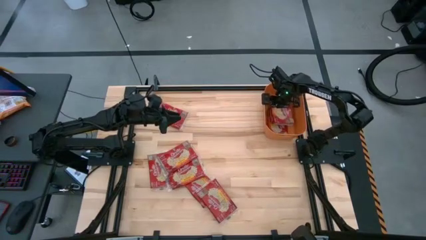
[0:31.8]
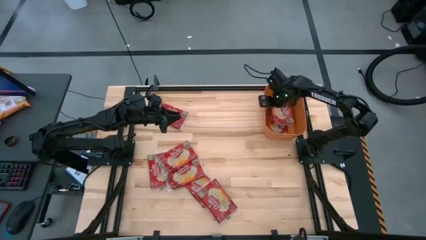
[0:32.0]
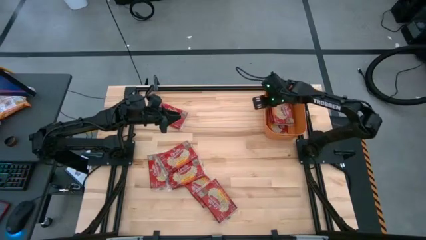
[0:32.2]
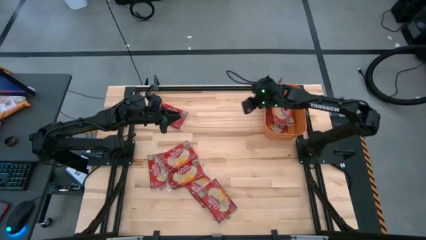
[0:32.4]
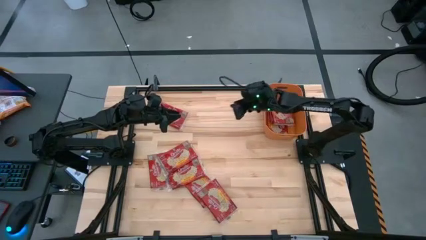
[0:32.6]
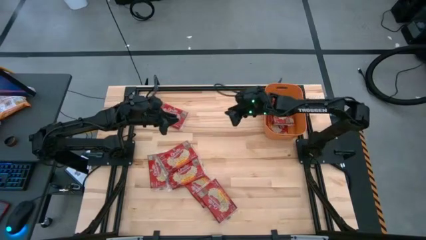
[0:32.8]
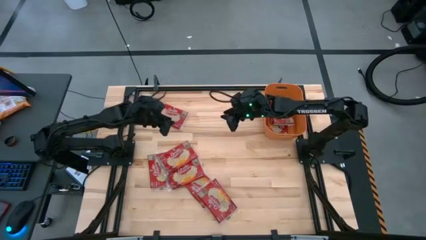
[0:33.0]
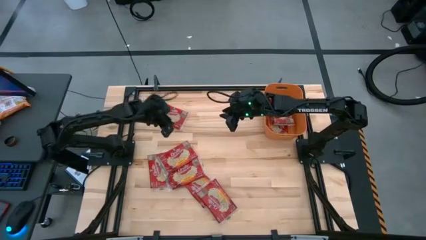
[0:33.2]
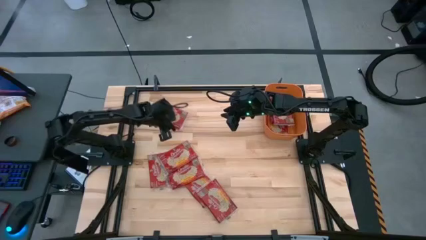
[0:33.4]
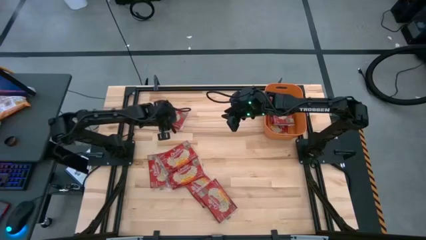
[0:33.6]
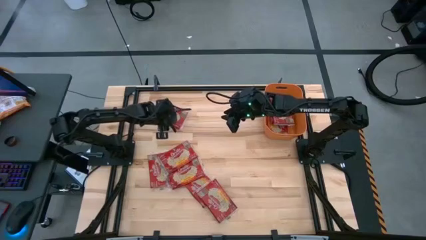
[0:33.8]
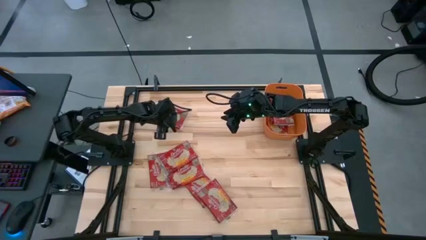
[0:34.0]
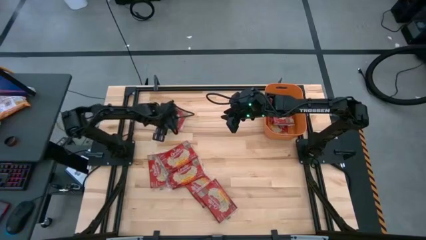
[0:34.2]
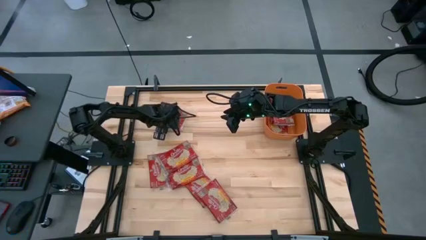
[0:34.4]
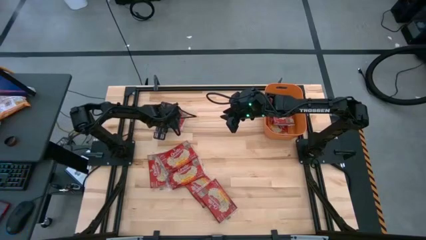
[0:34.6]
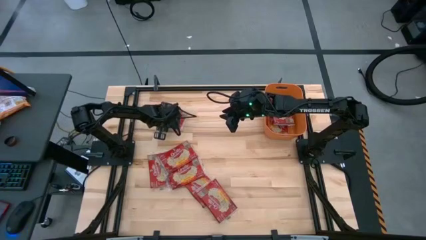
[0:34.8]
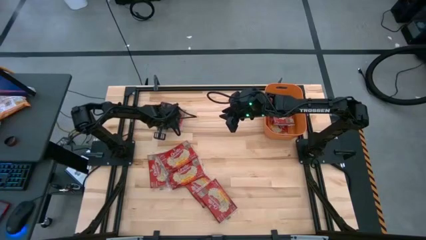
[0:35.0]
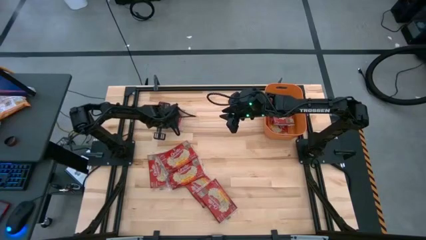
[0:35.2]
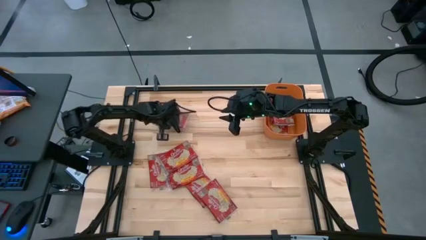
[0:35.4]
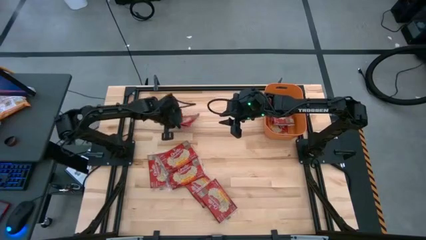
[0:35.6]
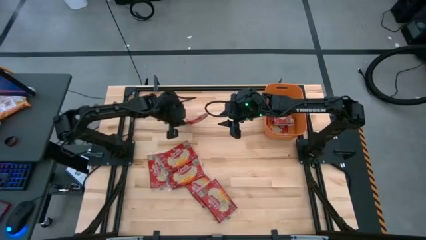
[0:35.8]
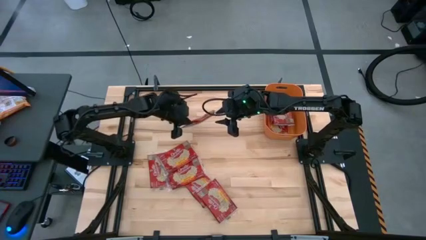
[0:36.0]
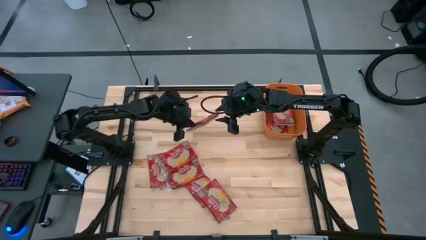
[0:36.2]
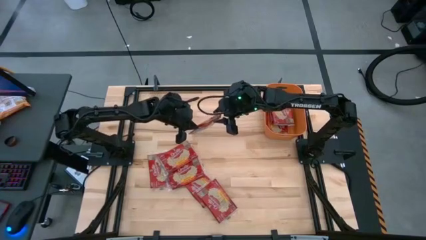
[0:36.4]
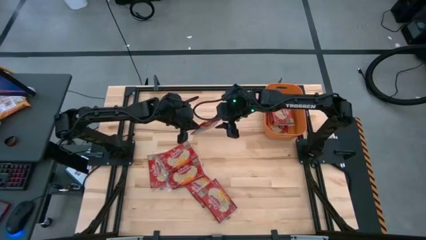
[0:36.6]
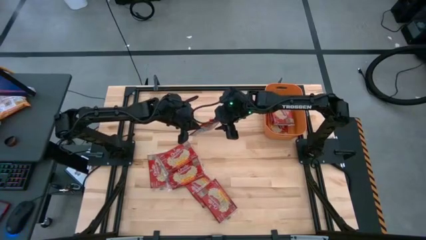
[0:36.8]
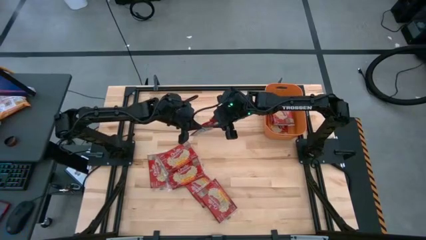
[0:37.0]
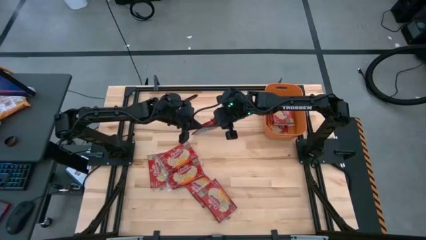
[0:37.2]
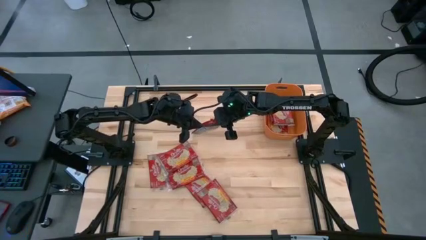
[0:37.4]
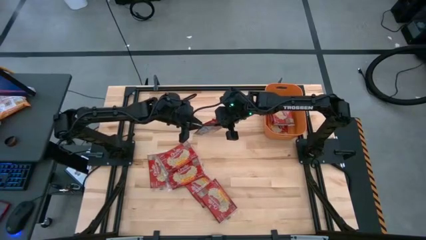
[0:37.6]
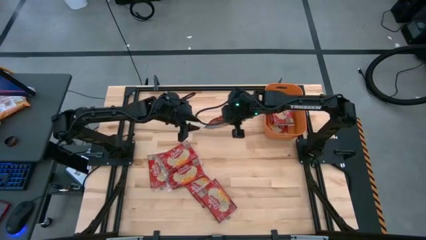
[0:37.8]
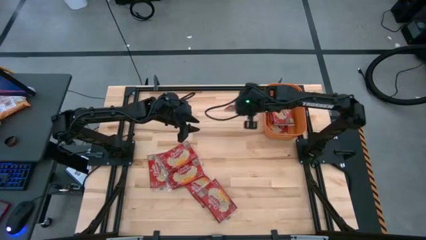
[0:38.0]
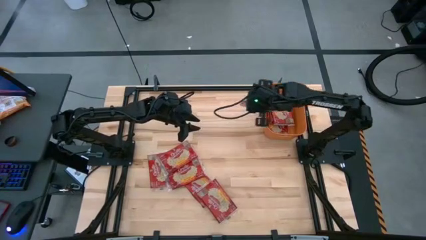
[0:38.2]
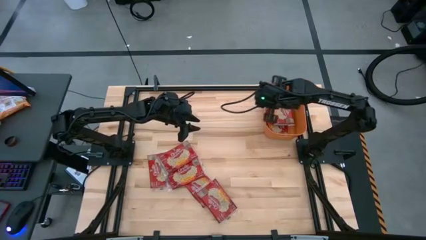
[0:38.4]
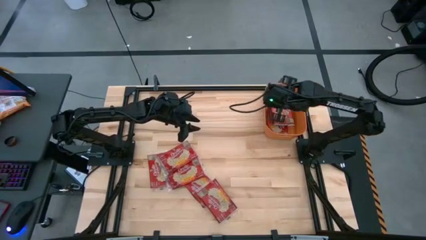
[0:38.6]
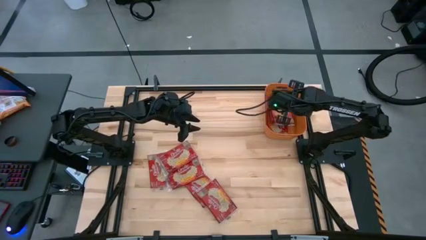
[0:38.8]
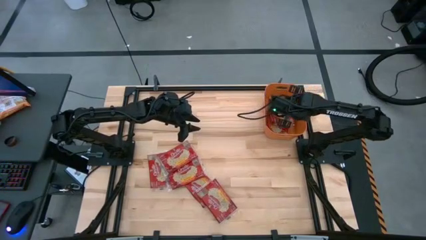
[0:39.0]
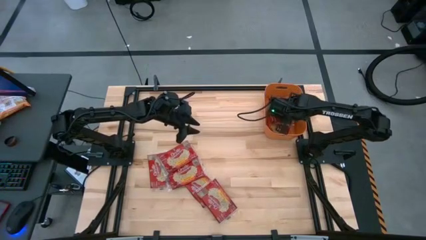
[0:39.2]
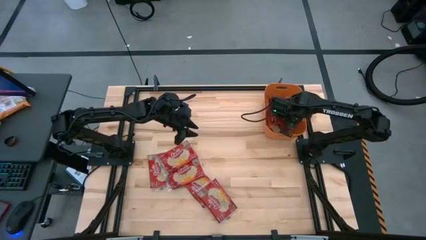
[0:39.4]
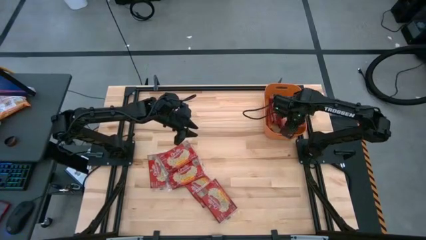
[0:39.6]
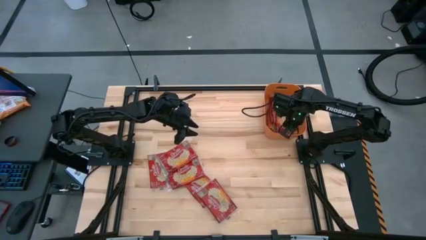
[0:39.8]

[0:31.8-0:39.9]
Task: Sort popcorn bags into baskets
Stack the red popcorn on the orange bin

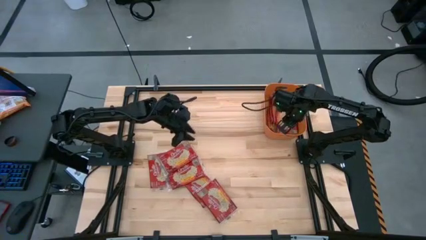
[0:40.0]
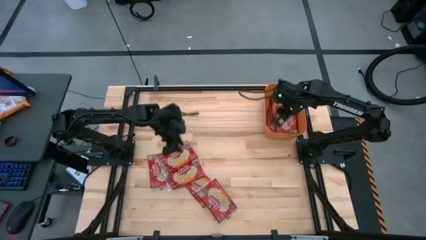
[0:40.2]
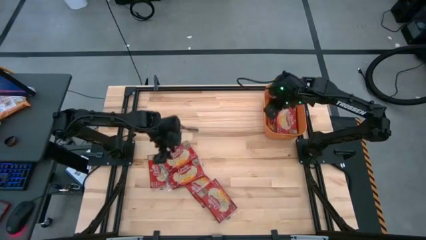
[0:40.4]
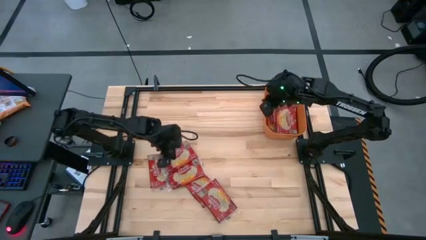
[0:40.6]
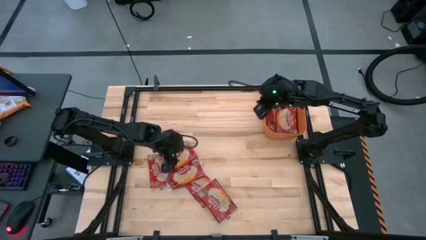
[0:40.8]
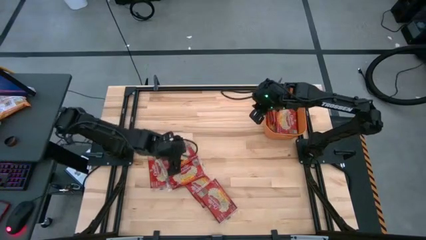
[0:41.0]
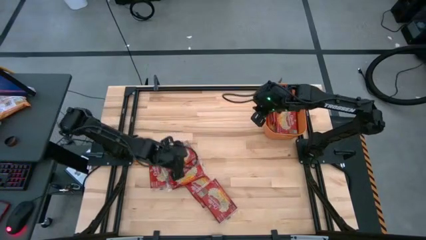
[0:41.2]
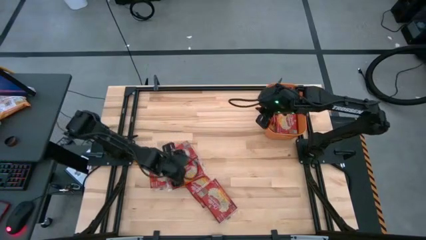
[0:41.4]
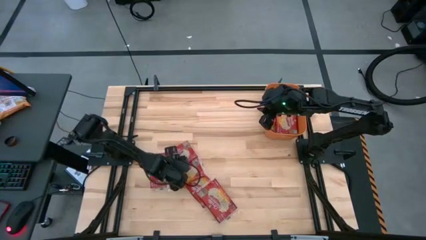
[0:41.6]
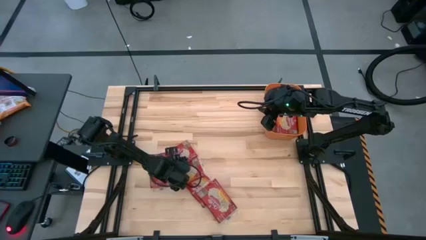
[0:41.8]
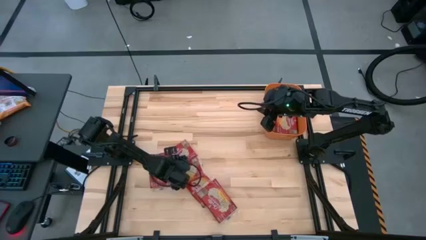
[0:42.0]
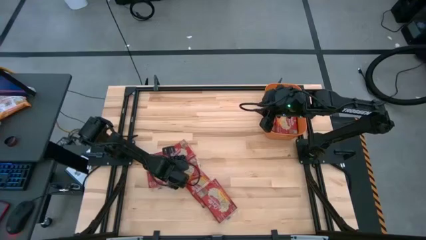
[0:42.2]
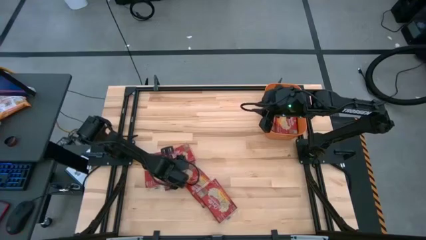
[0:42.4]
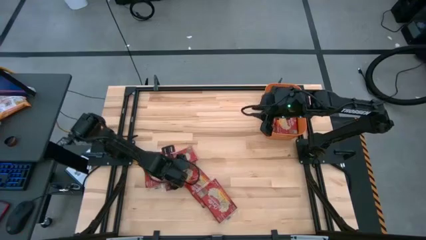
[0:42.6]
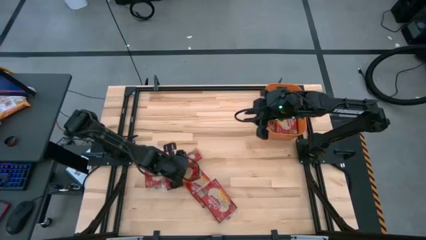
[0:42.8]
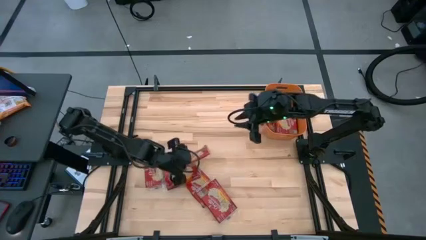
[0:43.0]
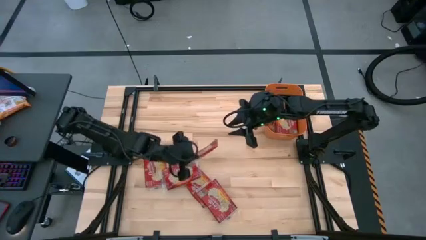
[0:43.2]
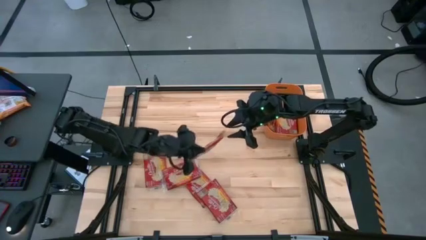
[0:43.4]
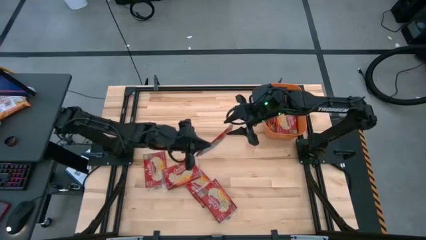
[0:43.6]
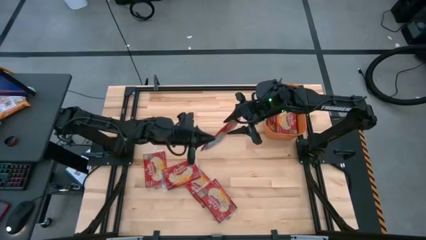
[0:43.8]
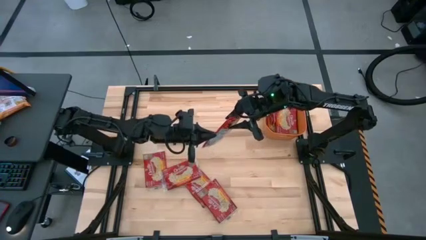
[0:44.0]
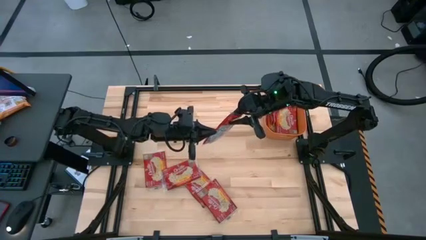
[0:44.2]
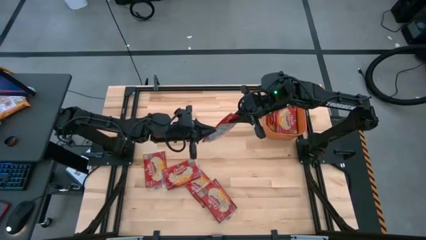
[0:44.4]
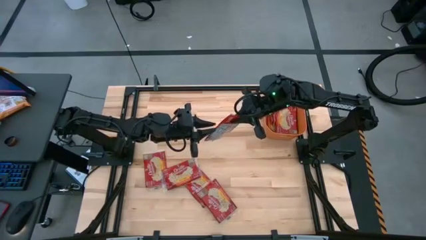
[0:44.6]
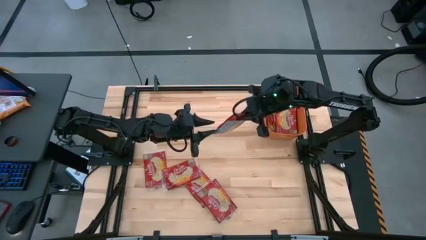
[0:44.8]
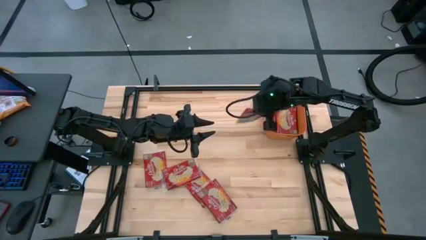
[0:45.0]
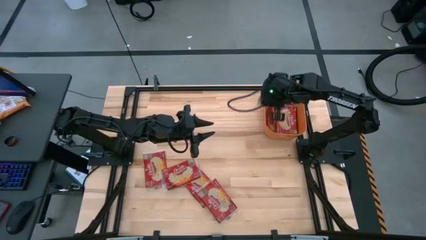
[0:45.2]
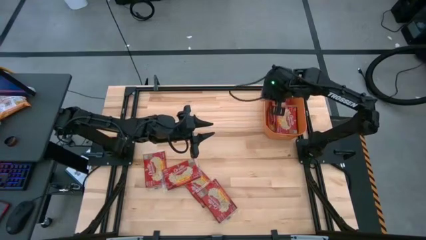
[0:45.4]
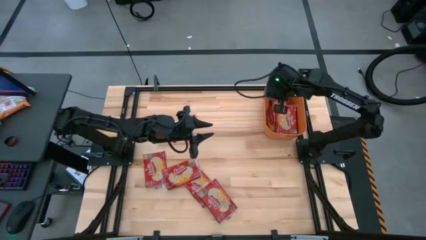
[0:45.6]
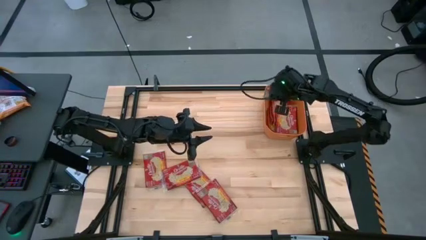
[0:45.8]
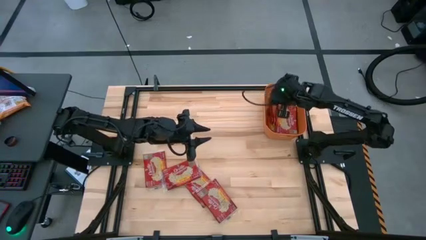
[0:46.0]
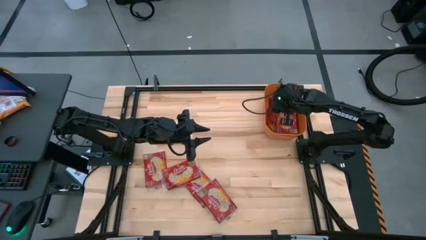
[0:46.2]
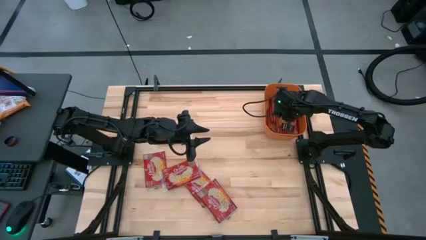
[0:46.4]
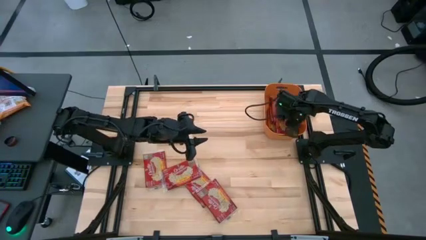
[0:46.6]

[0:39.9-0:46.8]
Stack the red popcorn on the orange bin

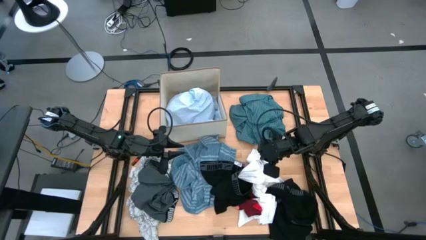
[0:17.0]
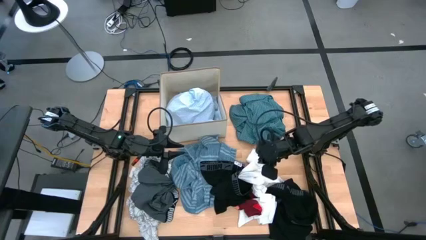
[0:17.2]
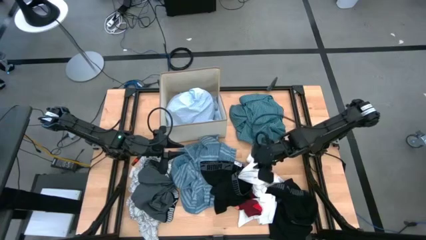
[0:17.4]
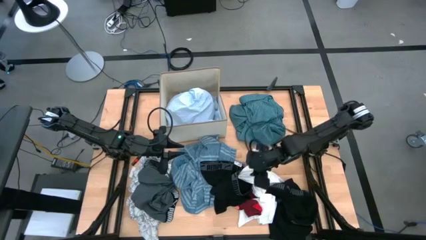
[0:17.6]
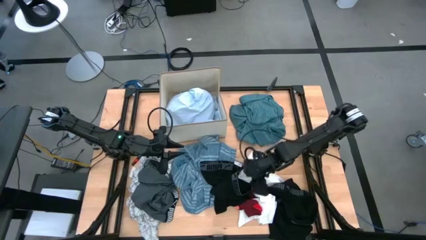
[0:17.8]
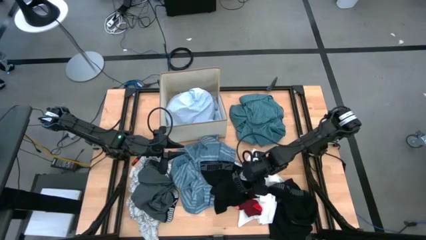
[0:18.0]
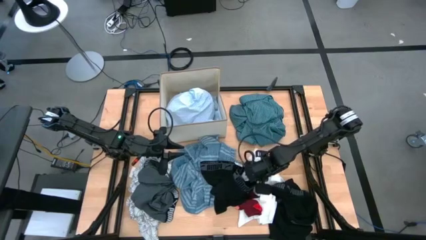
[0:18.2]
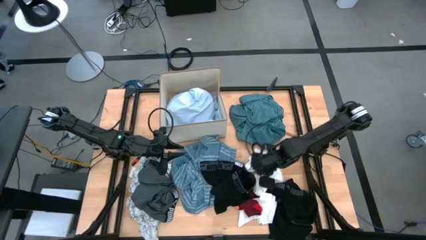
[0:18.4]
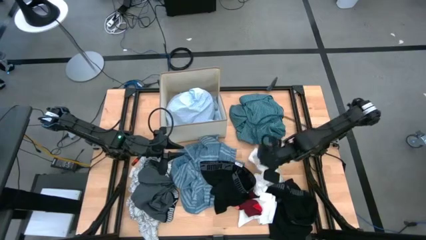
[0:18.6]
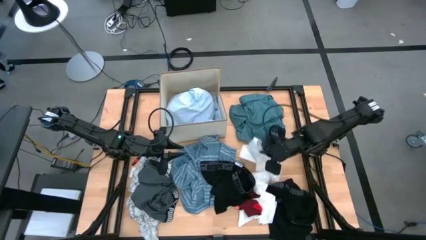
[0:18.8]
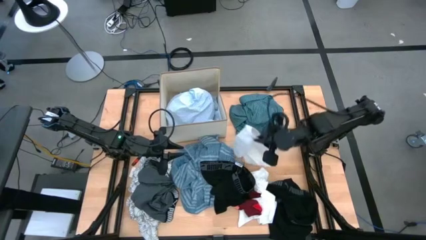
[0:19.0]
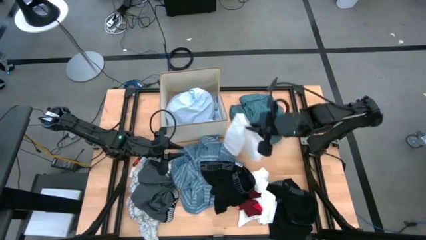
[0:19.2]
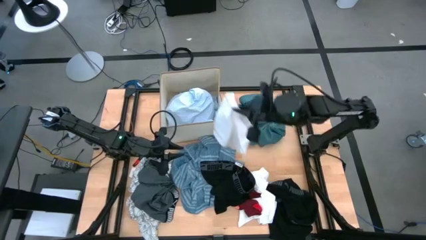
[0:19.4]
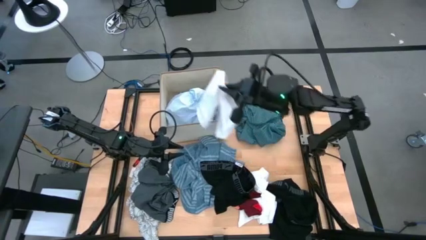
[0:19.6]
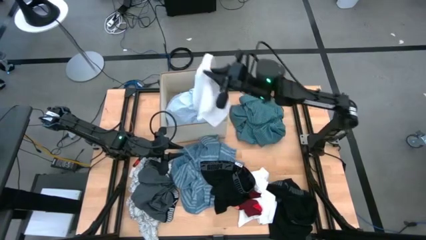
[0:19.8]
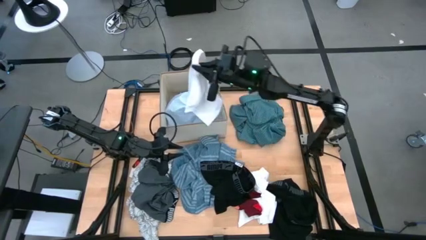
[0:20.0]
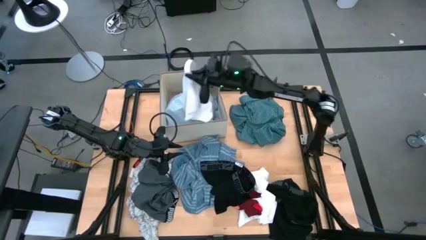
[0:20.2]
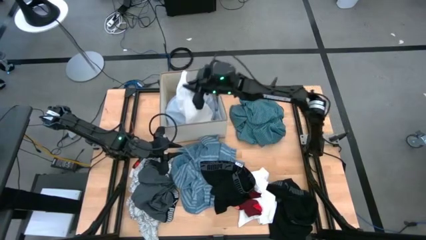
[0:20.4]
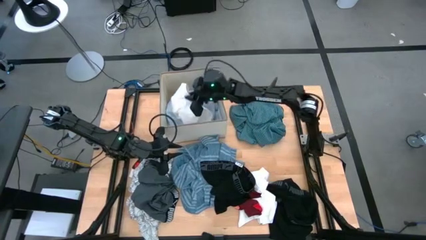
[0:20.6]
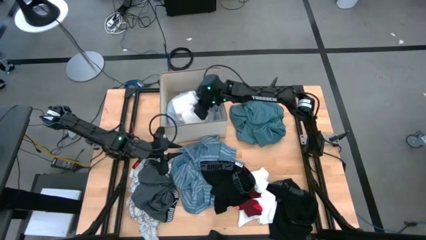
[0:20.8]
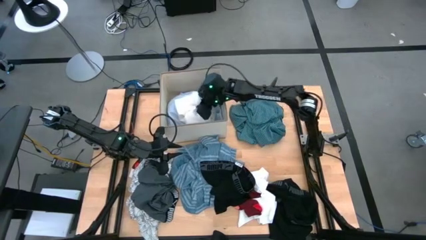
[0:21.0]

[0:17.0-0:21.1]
Task: Sort clothes
Put the white underwear into the beige laundry organizer
